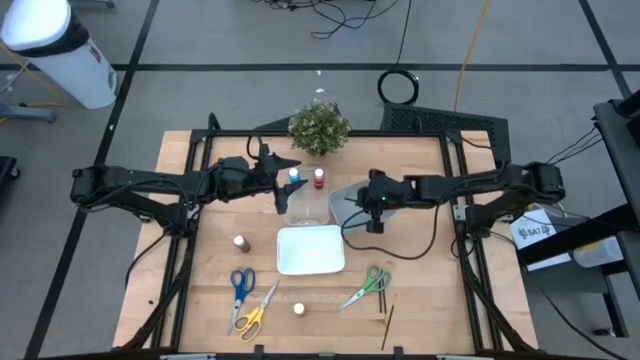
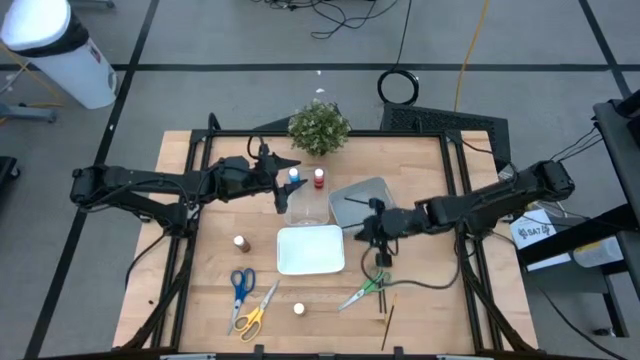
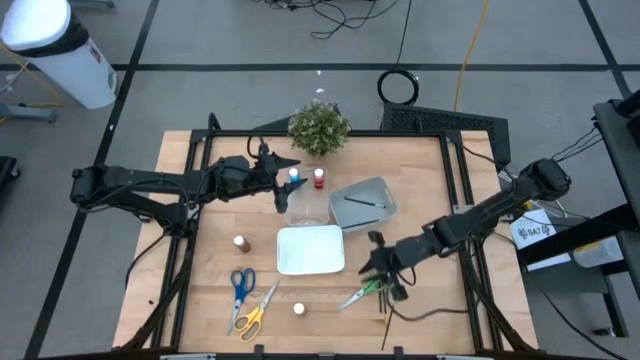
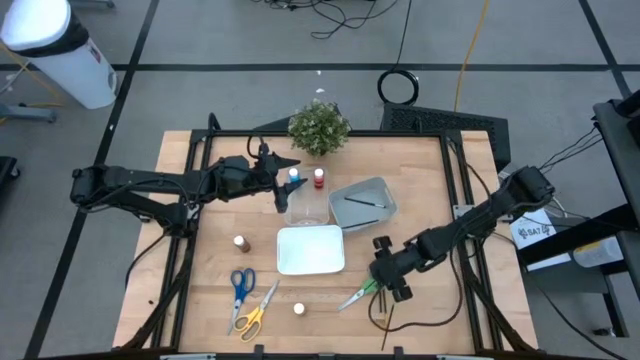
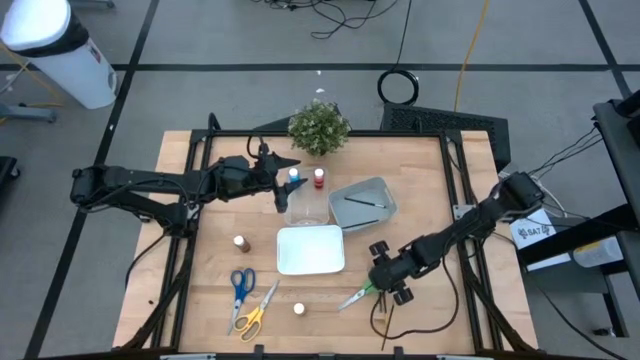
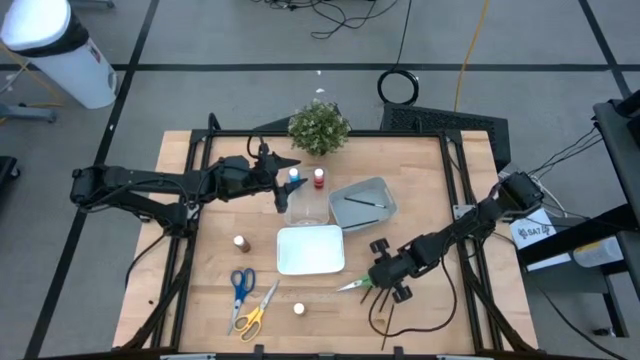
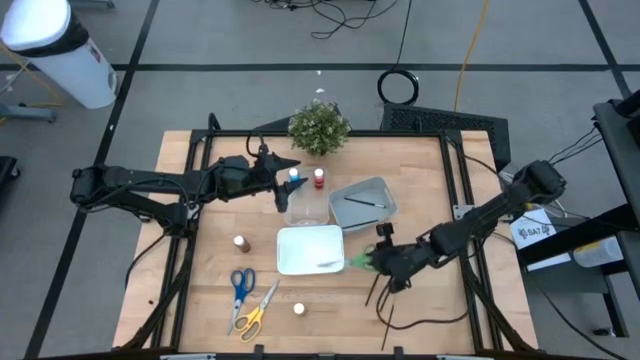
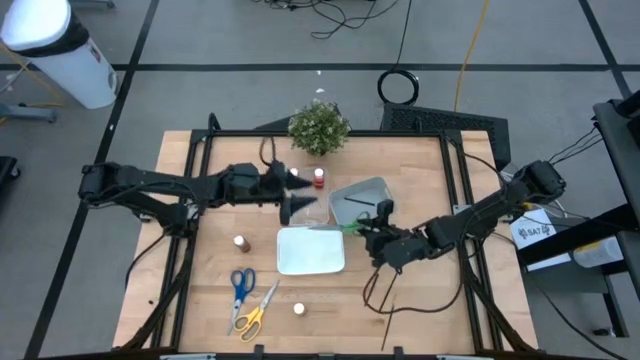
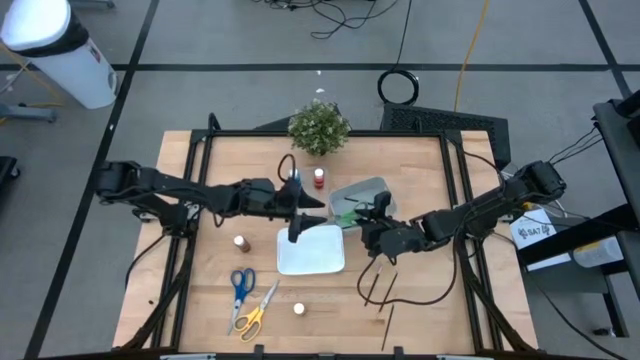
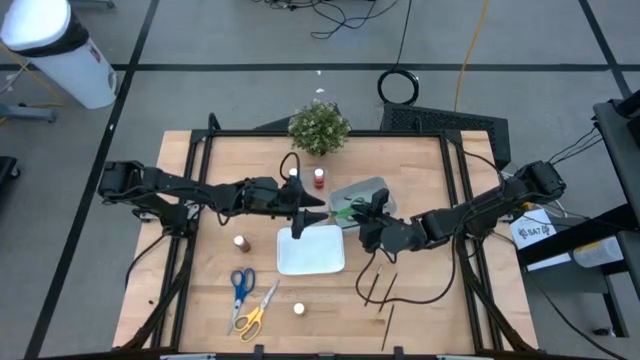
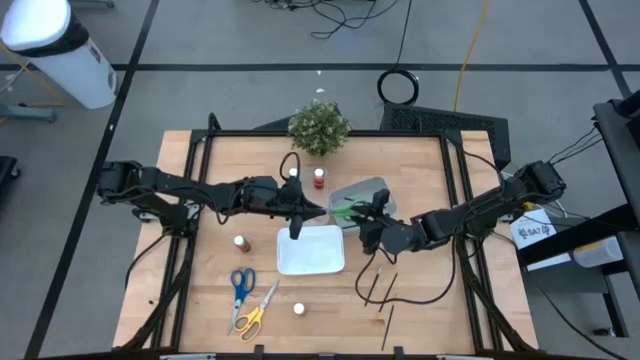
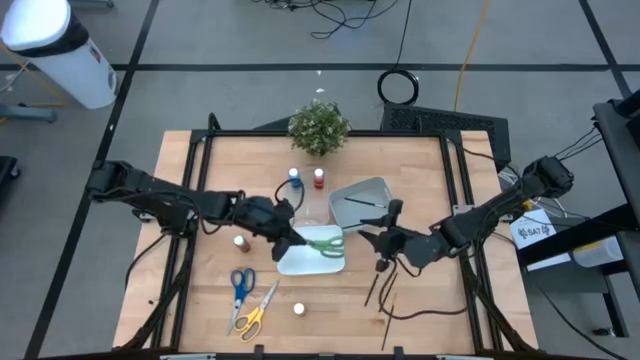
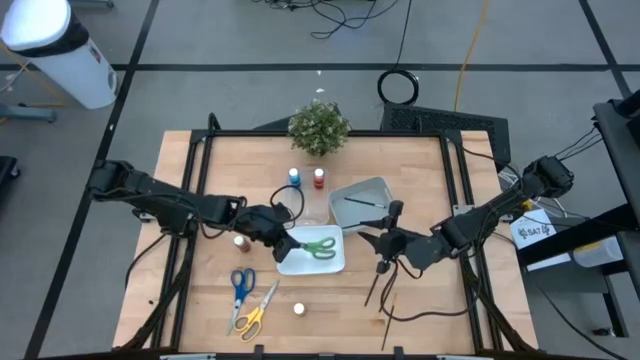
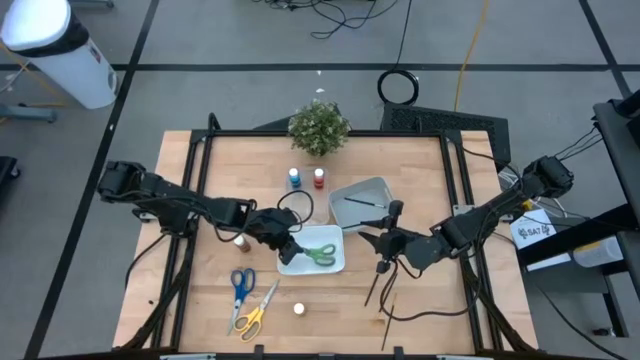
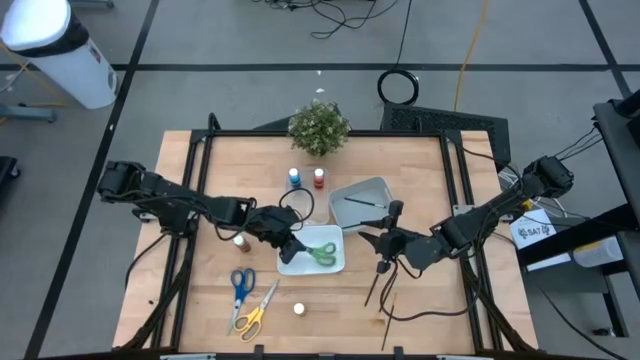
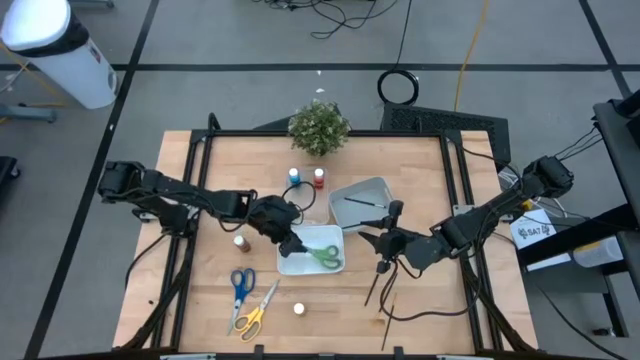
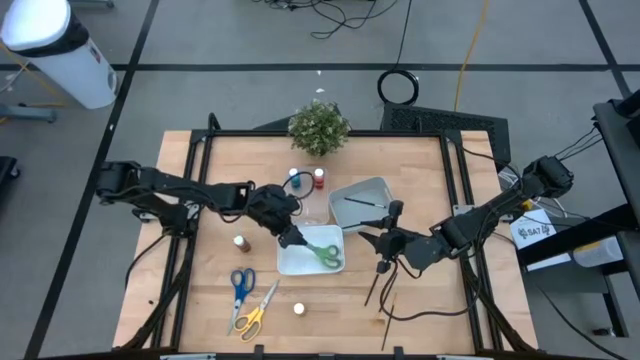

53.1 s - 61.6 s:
Task: Pick & Place Paint Supplies
Put the green scissors into the white bin

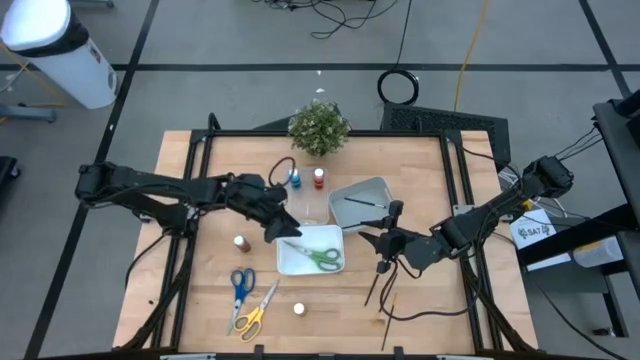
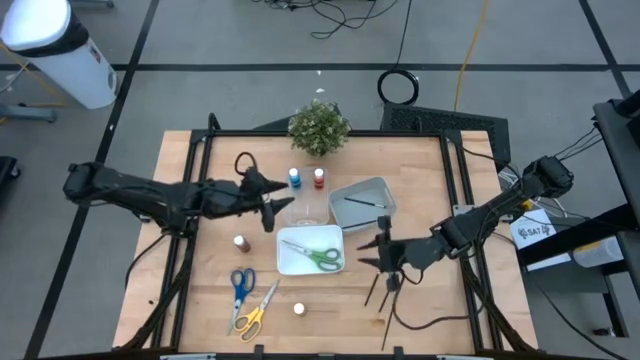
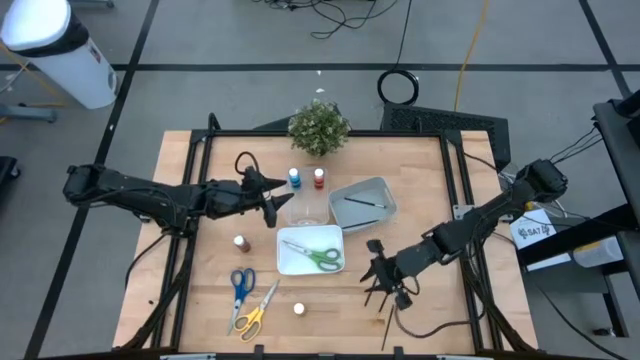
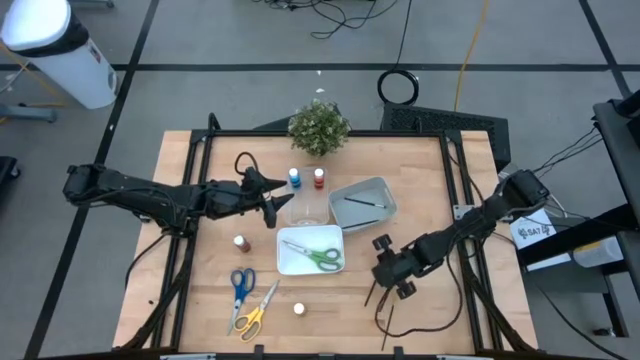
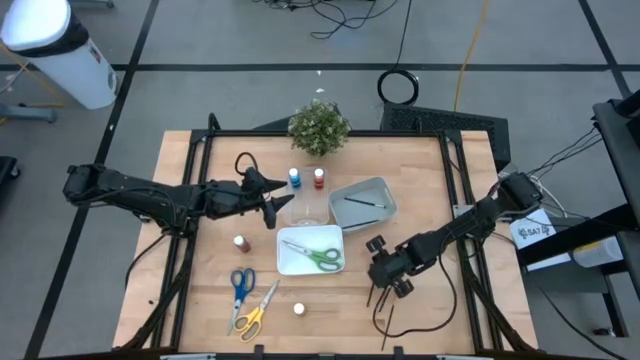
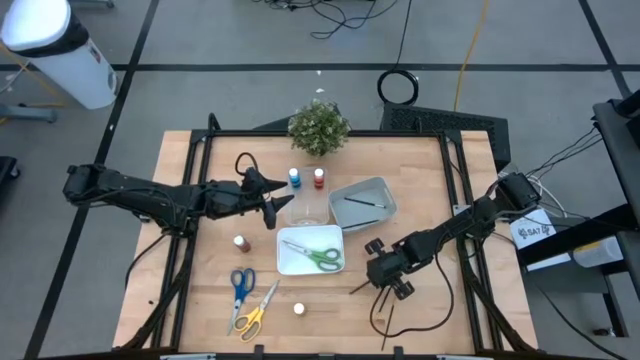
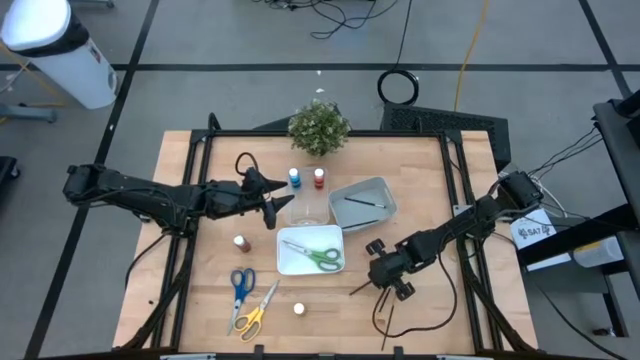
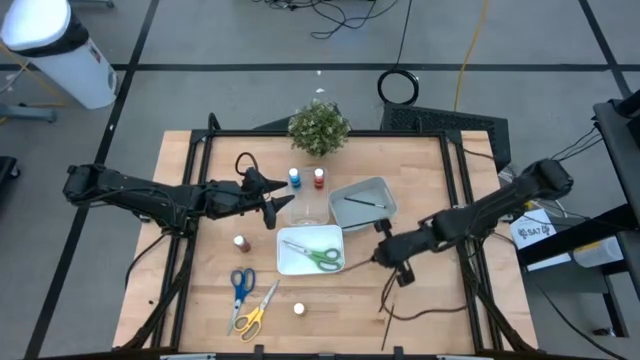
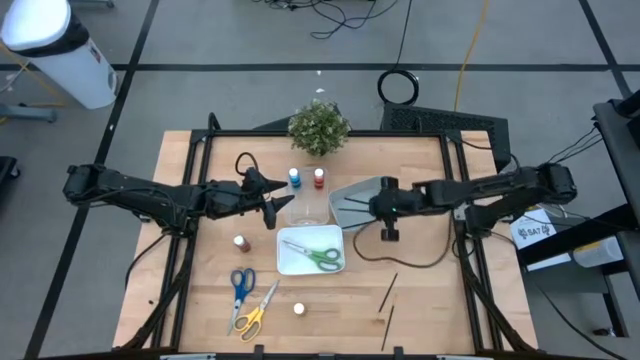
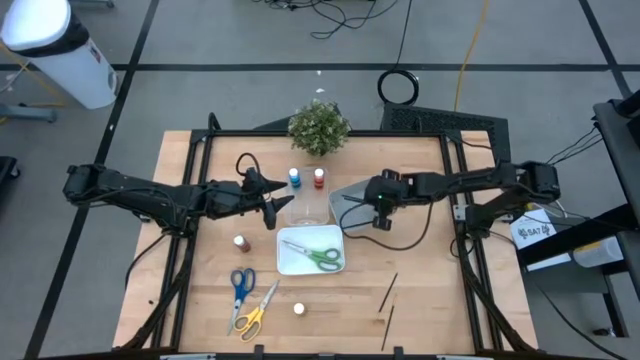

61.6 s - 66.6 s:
Put the silver paintbrush into the gray bin

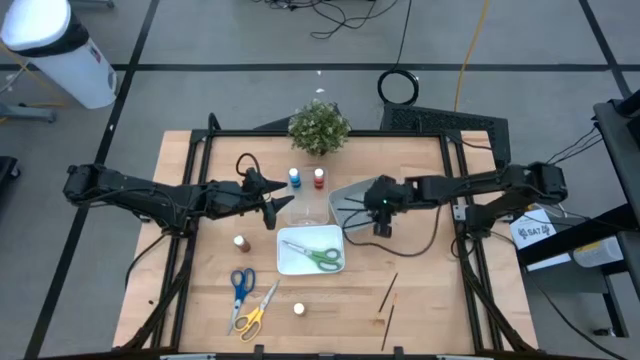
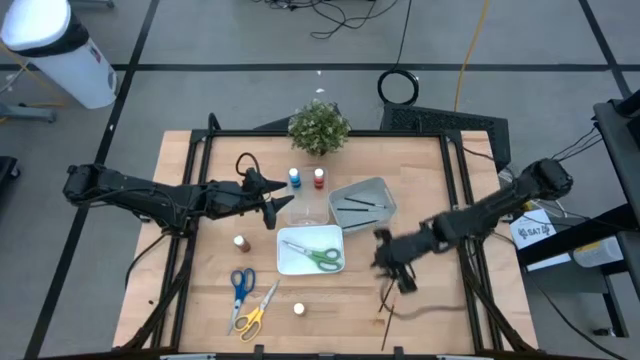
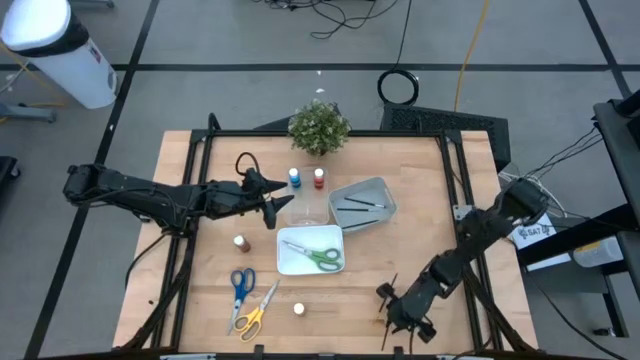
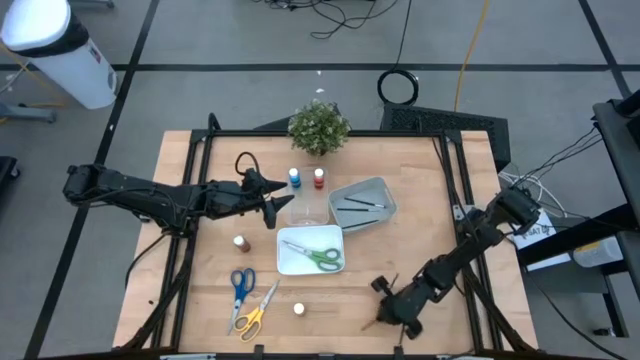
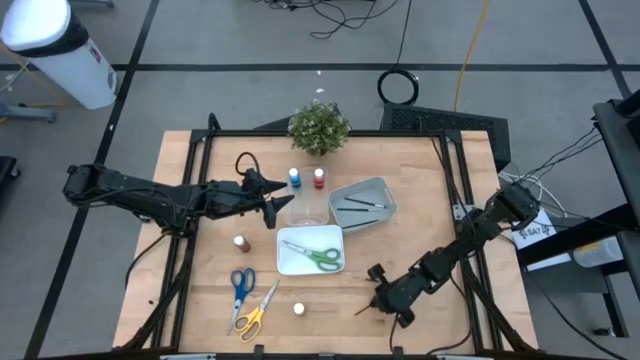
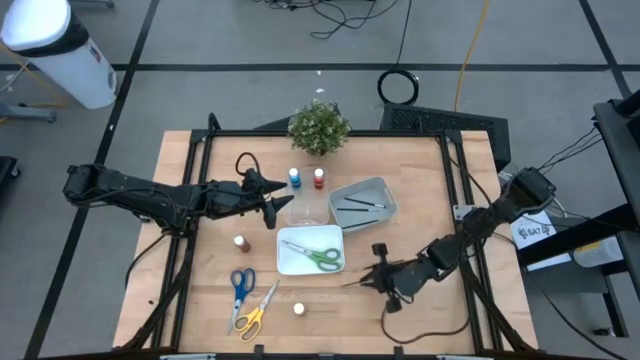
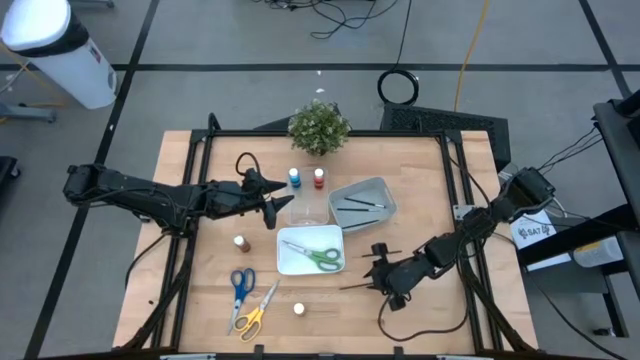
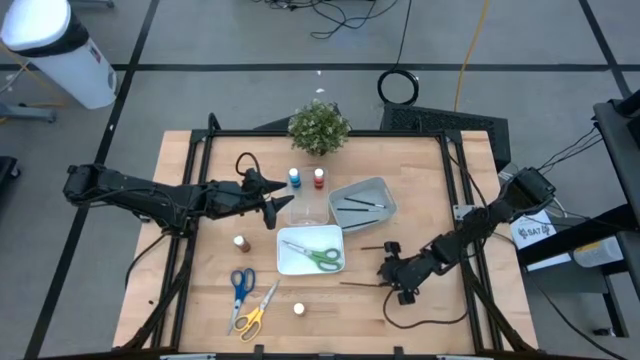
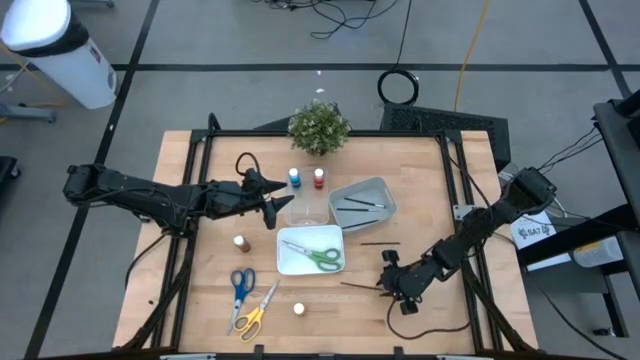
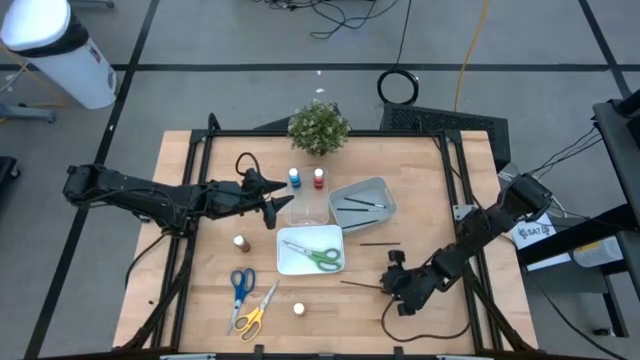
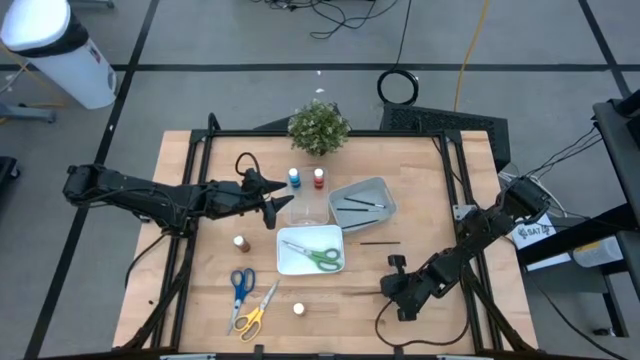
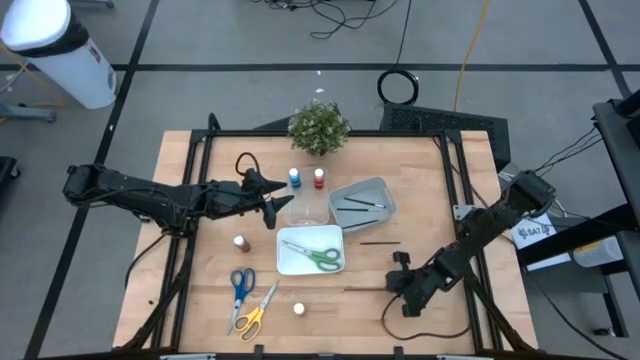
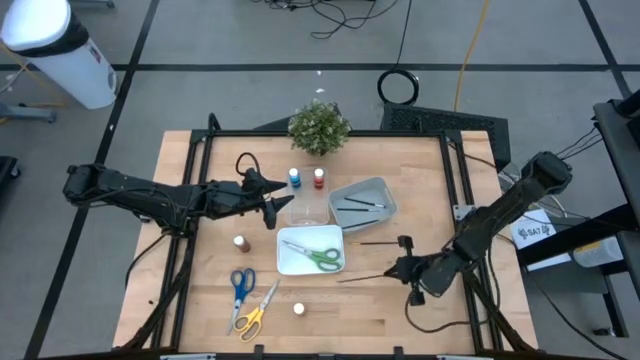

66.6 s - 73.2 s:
Put the gold paintbrush into the gray bin

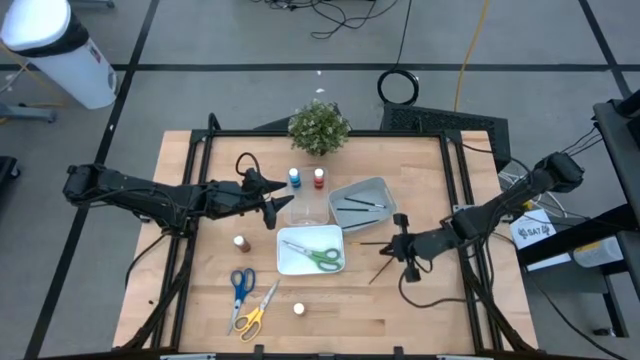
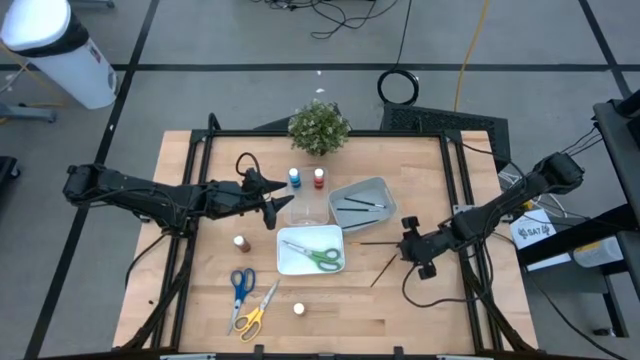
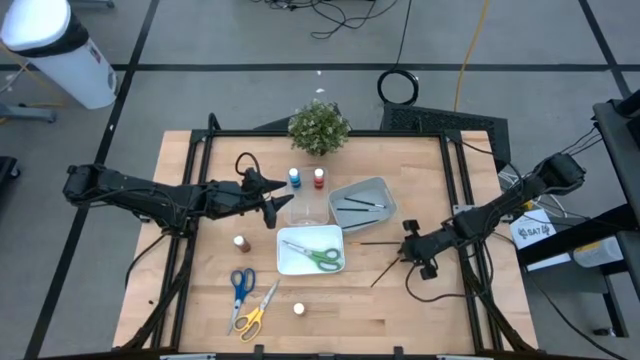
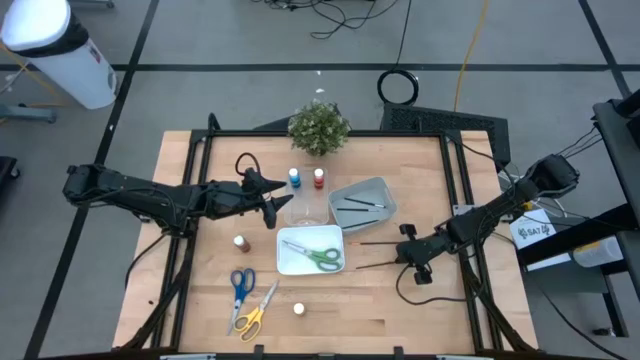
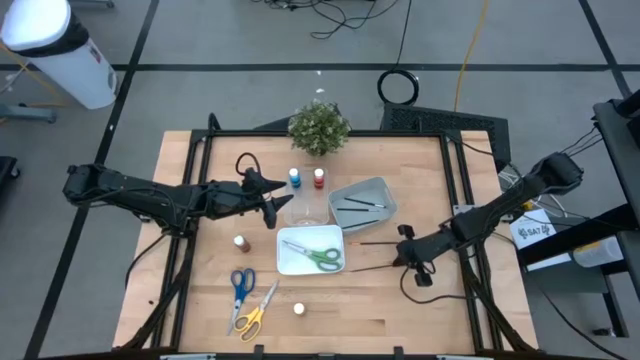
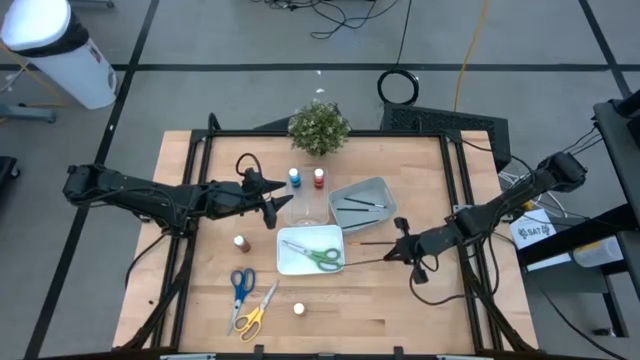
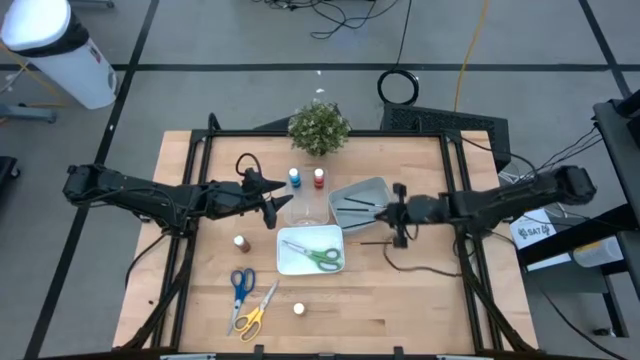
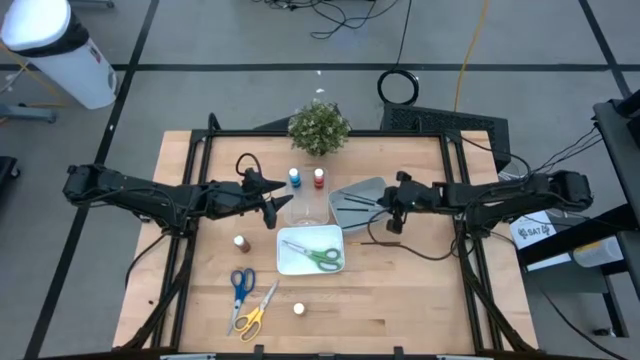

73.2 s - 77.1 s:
Put the gold paintbrush into the gray bin
